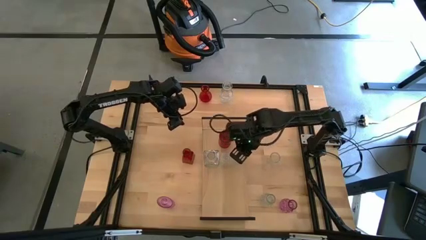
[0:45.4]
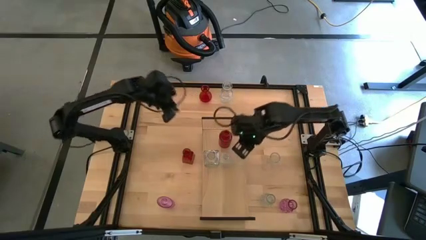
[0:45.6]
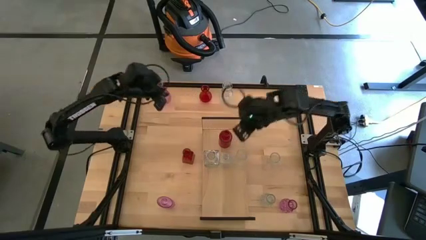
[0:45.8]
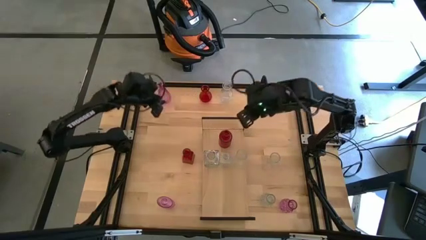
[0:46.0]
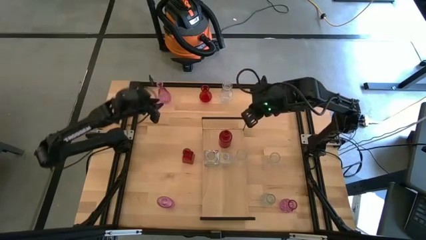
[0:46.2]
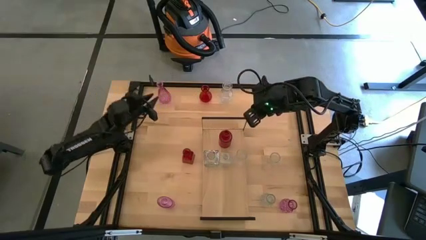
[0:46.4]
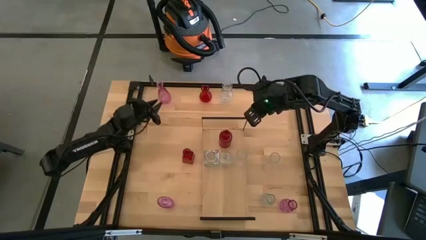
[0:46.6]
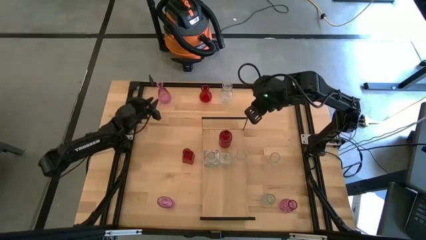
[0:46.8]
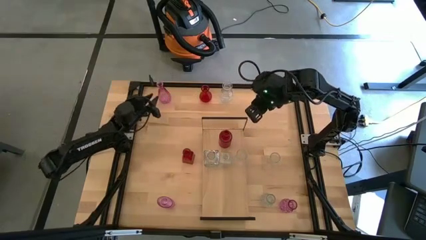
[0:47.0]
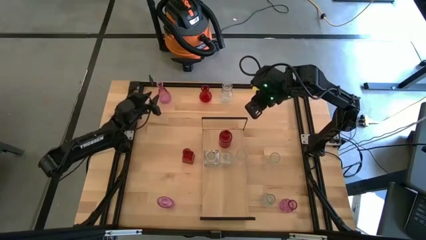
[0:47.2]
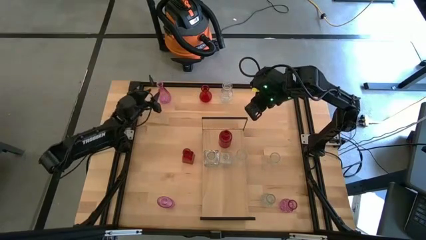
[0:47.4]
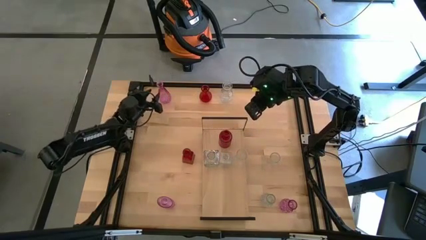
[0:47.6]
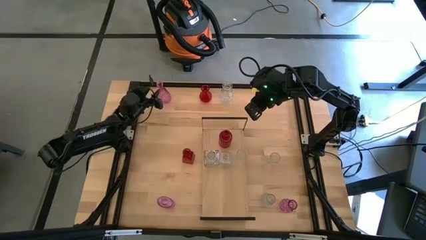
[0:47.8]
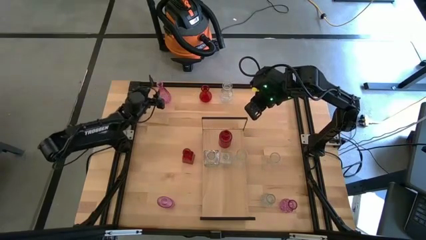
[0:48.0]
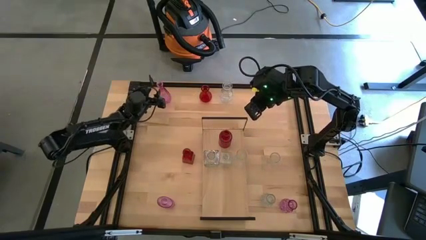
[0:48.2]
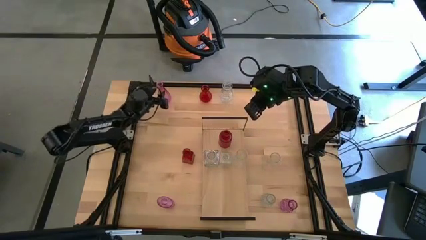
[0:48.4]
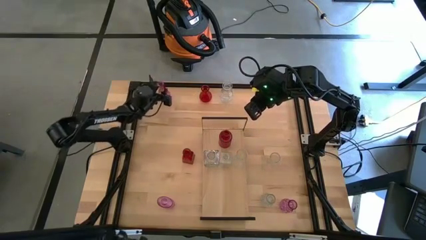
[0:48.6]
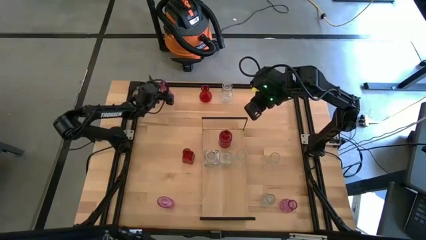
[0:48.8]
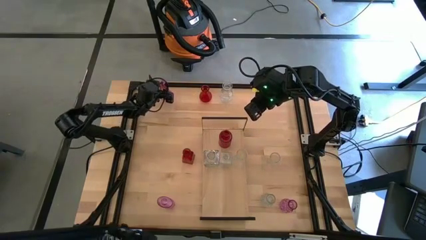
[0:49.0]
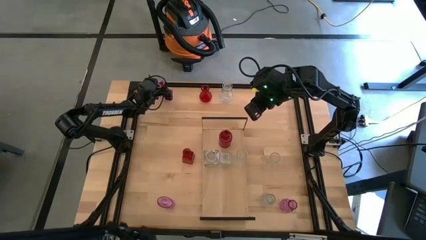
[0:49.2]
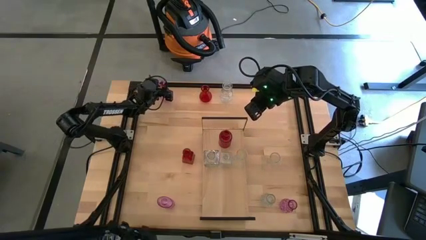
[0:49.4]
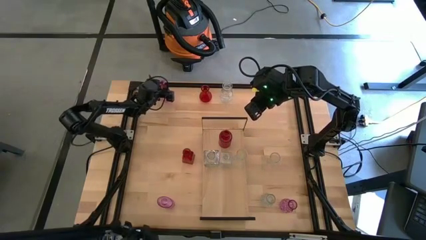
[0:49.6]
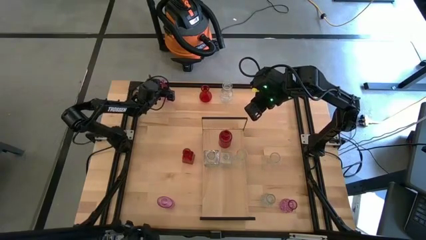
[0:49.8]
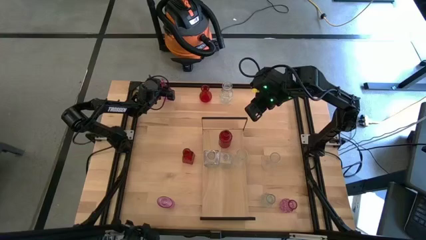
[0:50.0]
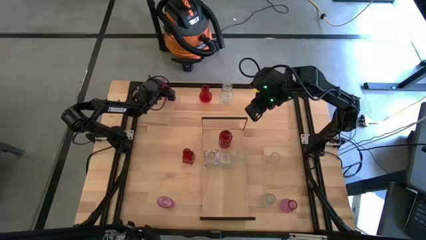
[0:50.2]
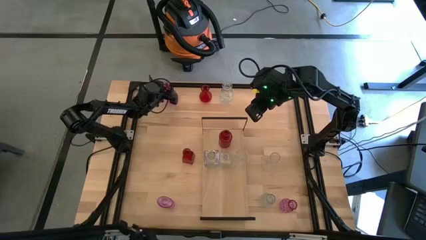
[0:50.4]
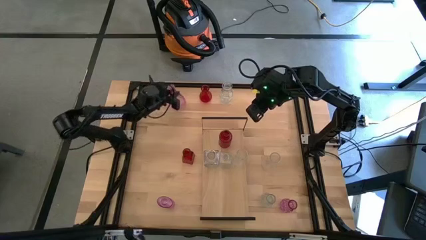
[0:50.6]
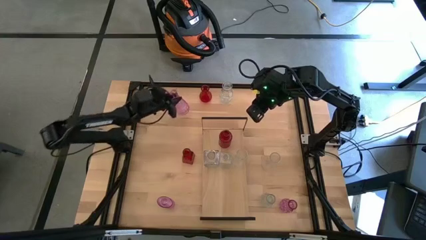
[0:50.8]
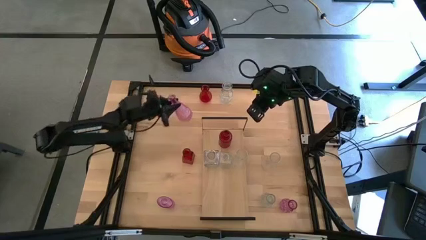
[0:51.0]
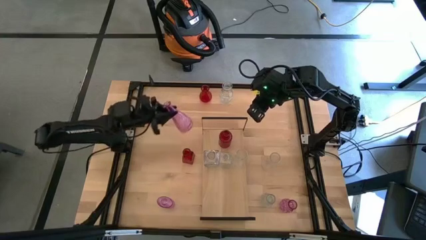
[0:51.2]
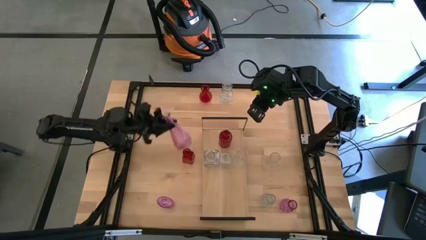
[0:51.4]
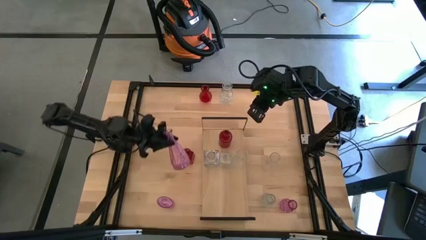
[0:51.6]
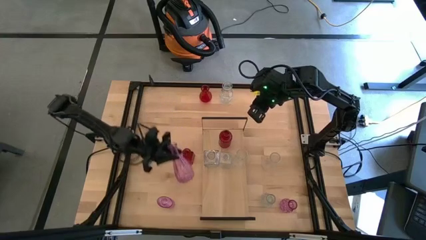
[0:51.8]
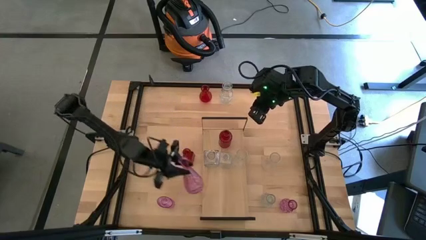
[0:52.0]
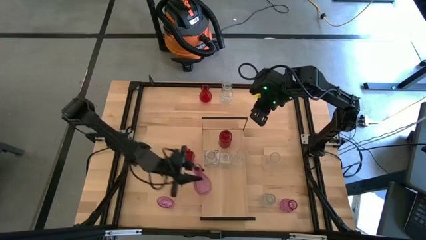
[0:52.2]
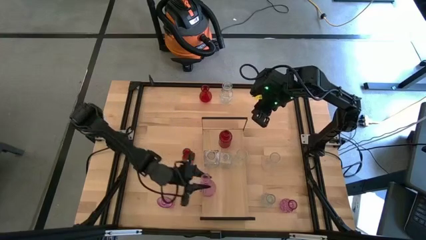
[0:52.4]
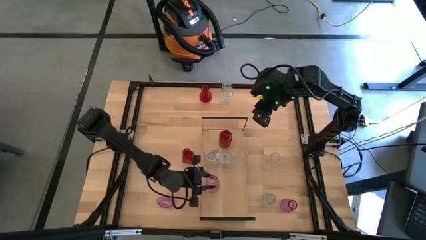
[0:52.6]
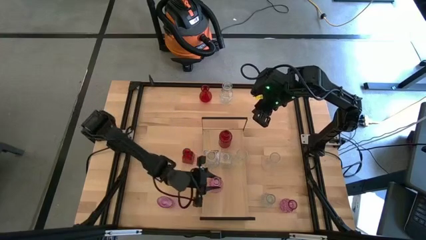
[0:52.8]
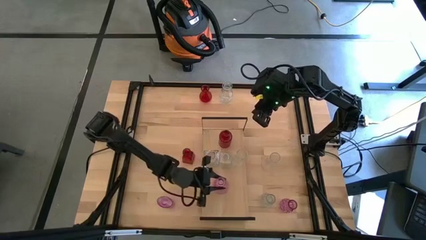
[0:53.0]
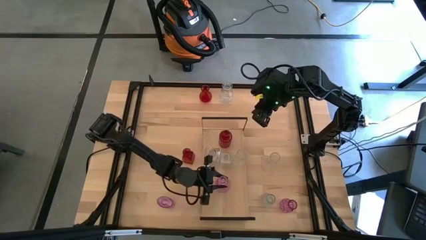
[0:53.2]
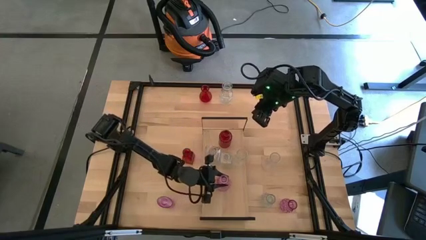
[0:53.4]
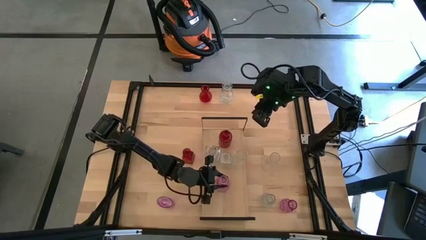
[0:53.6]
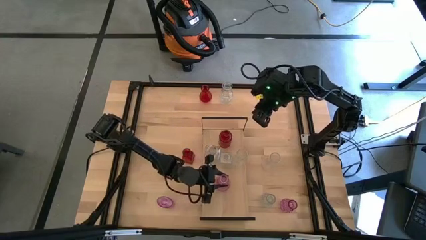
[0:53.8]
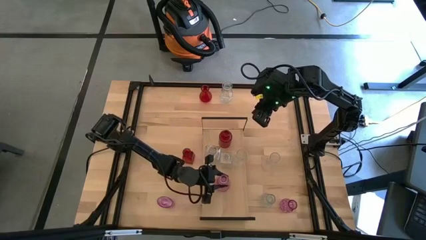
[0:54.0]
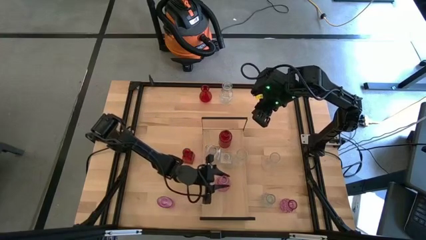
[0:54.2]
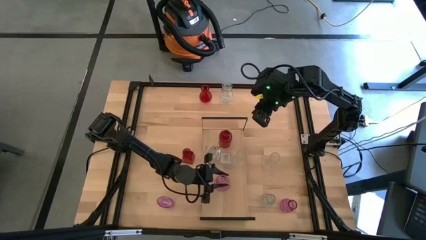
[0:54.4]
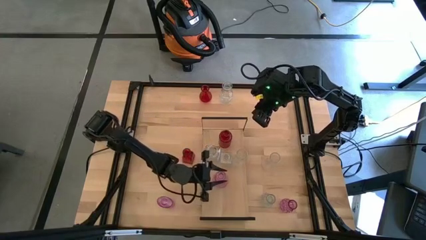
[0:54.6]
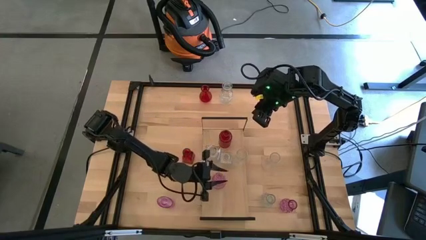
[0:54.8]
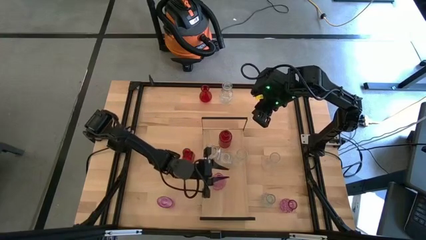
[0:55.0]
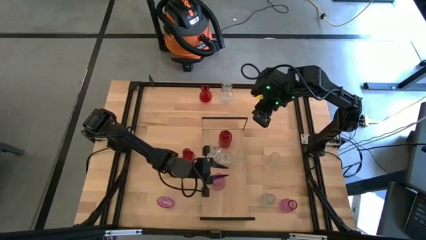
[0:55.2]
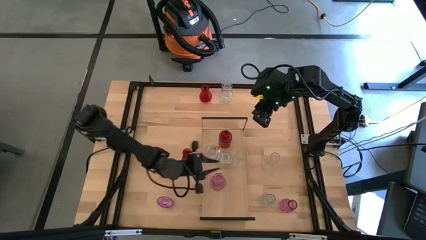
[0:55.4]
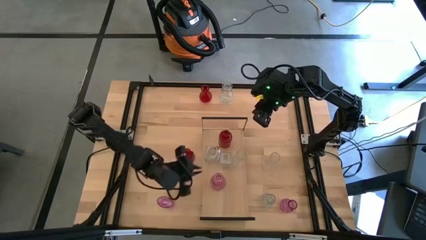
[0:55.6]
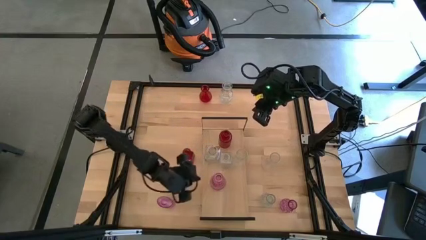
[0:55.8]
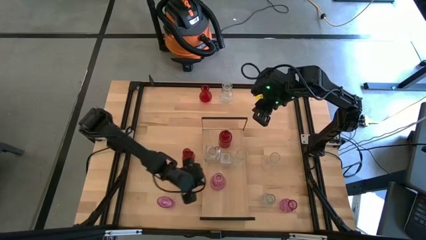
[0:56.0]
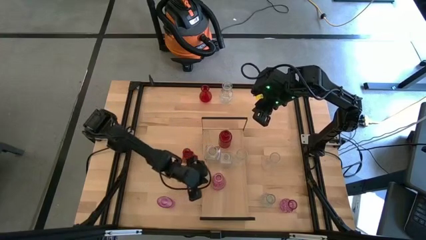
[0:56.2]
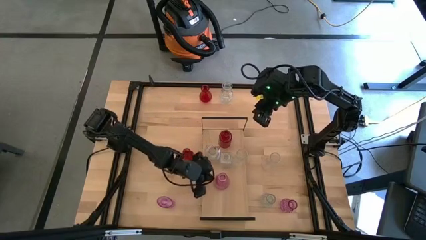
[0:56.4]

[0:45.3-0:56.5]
Task: sort vases onto shelf
Put the light violet vase on the shelf

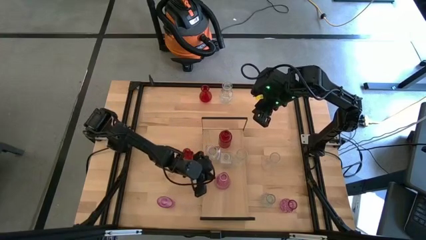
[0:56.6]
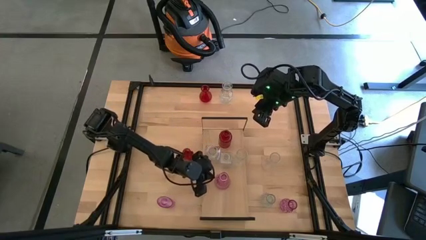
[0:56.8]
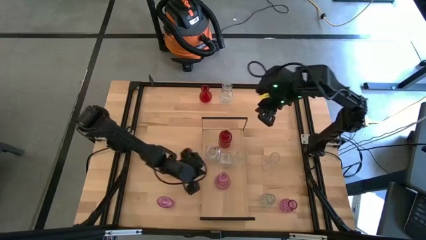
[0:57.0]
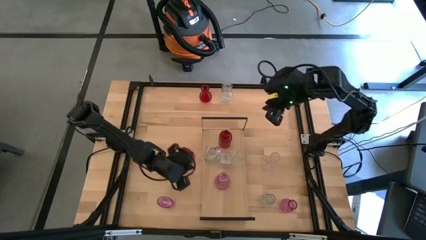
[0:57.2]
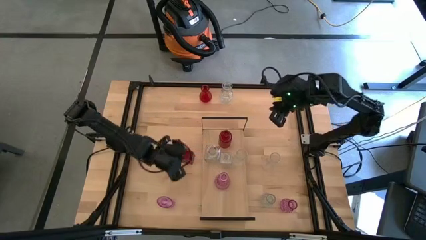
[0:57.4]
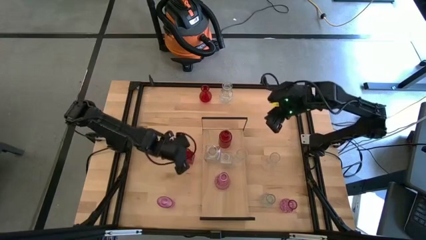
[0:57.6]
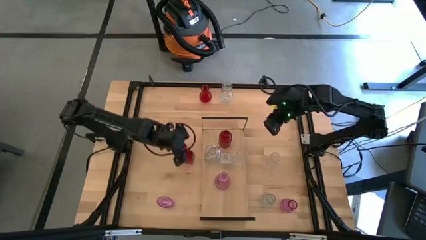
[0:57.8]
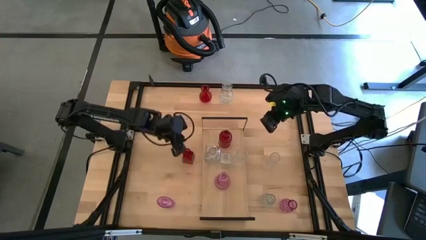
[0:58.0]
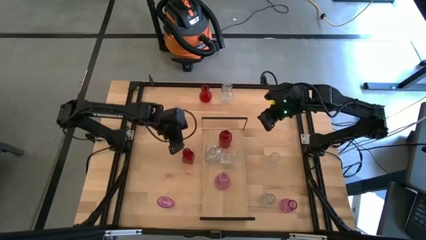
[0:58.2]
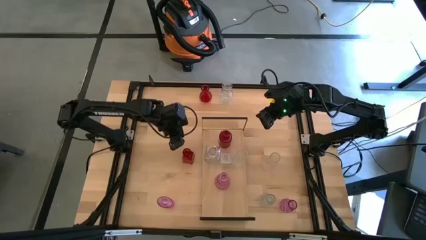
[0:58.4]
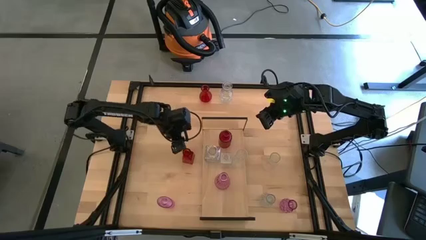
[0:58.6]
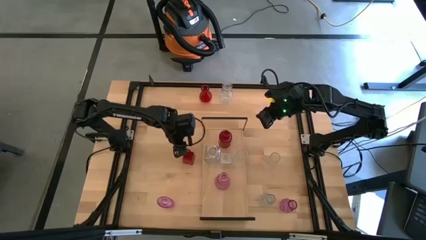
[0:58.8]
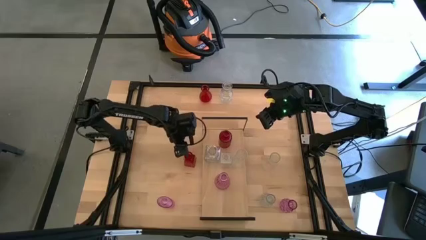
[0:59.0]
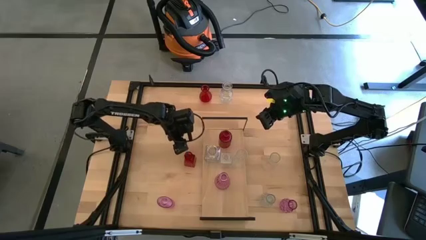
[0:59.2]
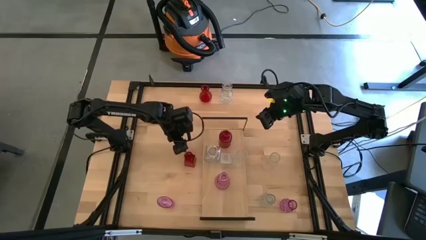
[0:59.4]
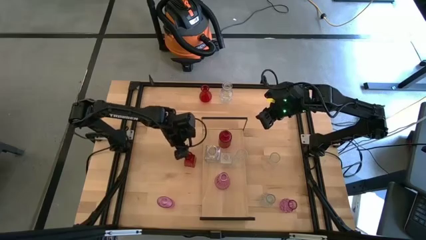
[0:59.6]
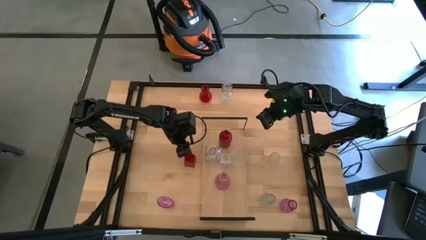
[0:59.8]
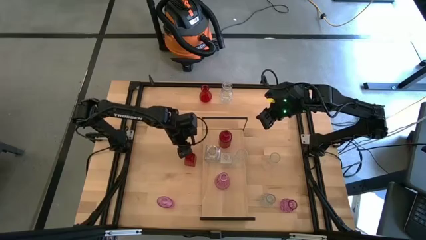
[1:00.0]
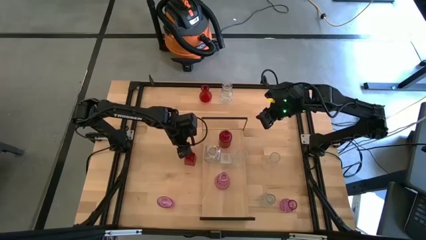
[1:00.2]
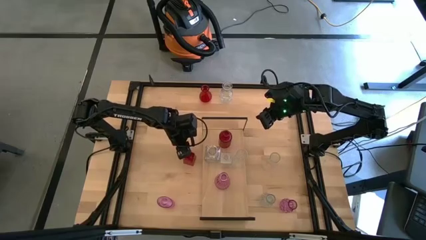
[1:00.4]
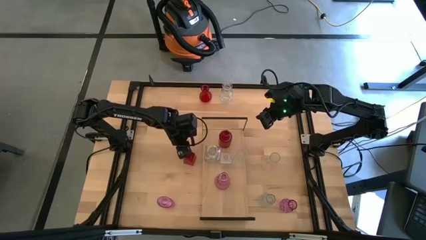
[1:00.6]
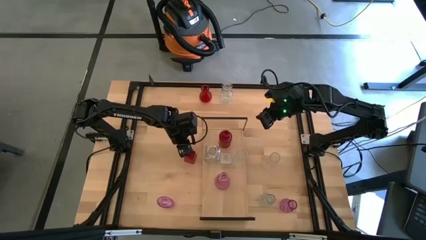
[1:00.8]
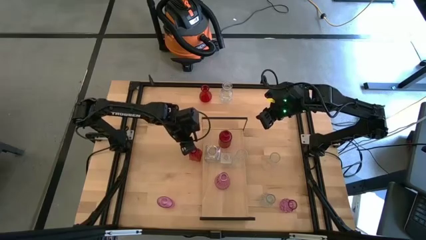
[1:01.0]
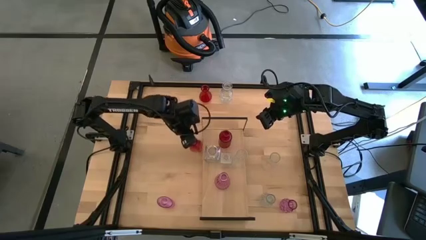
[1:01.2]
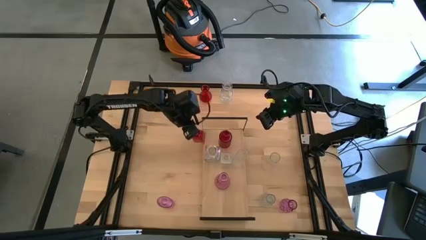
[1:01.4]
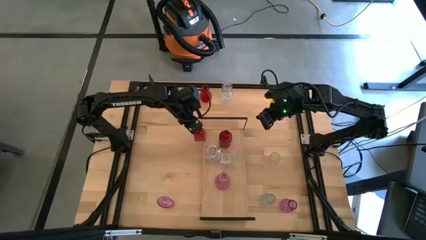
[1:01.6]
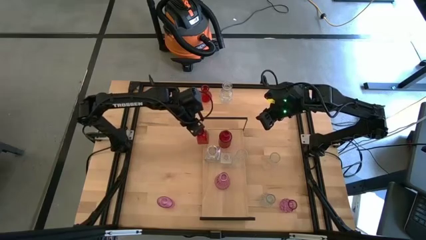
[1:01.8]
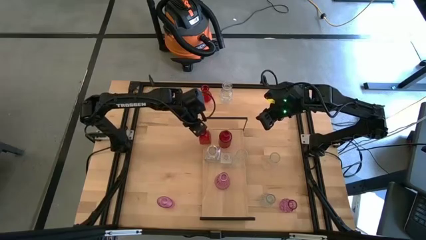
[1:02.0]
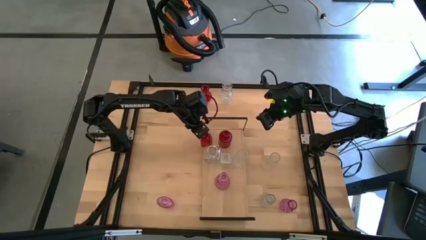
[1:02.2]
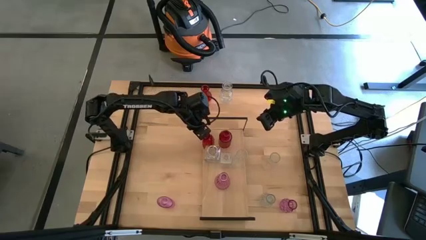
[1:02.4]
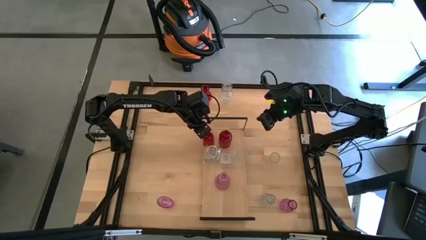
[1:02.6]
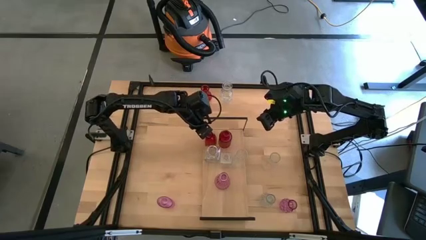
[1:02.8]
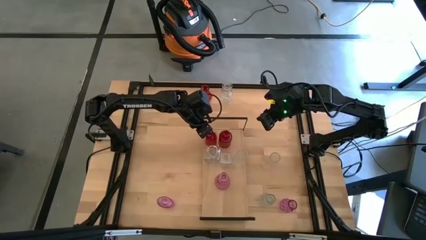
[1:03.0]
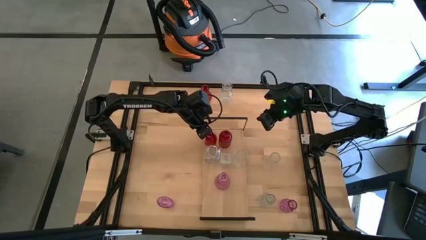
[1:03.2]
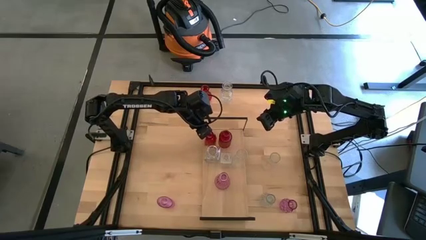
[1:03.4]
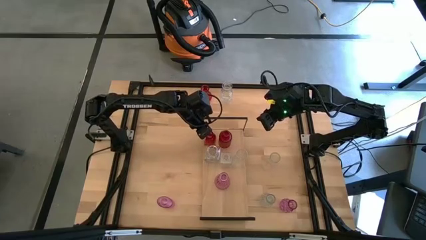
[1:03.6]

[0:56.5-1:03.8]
Put the red vase on the shelf aligned with the other red vase
